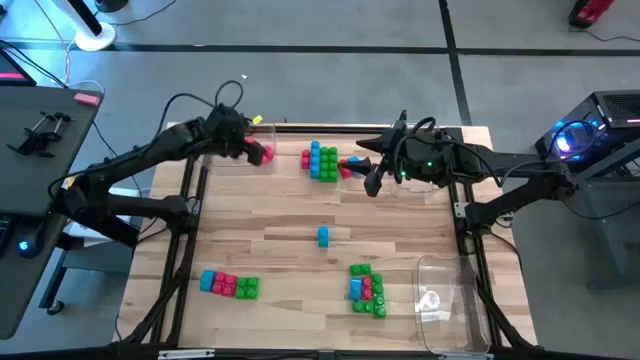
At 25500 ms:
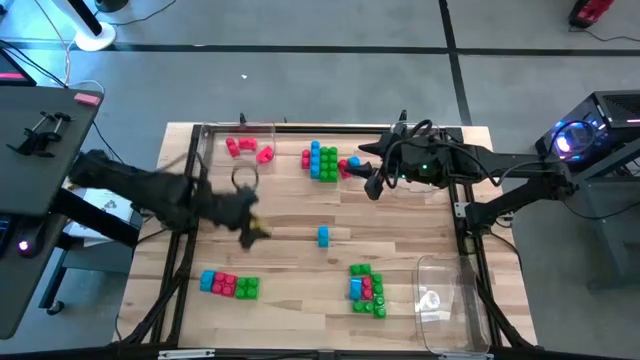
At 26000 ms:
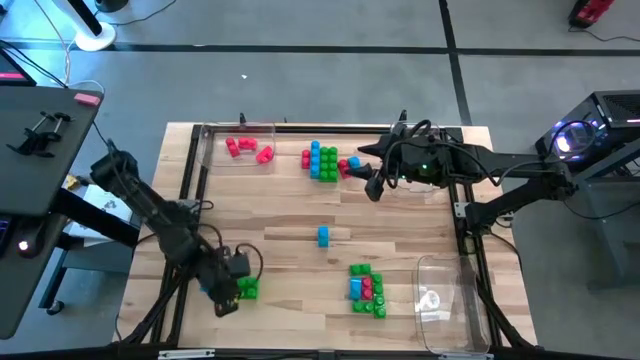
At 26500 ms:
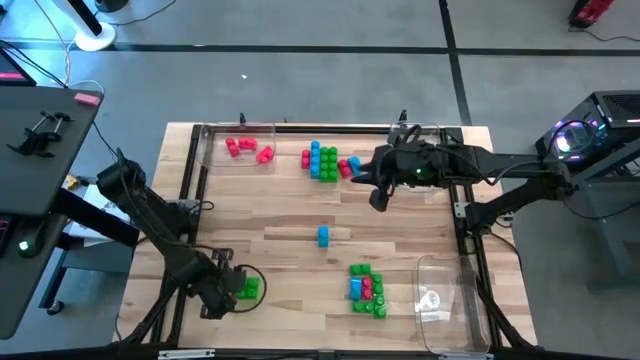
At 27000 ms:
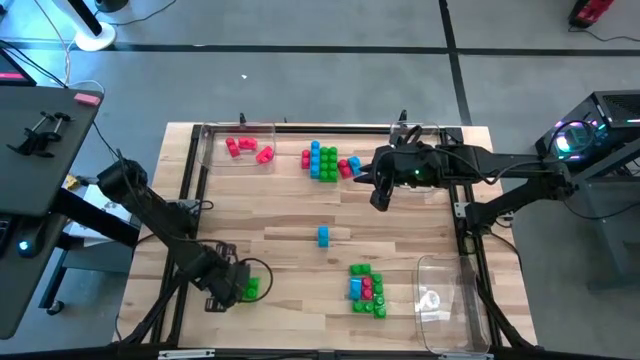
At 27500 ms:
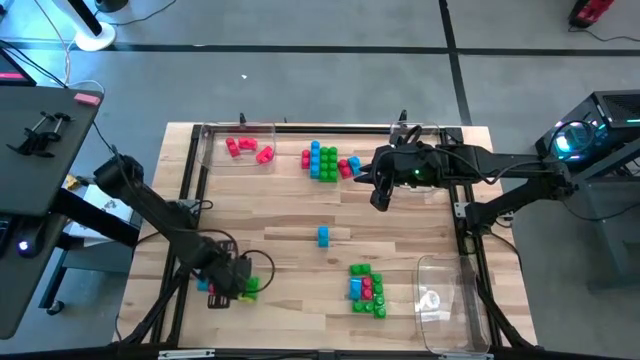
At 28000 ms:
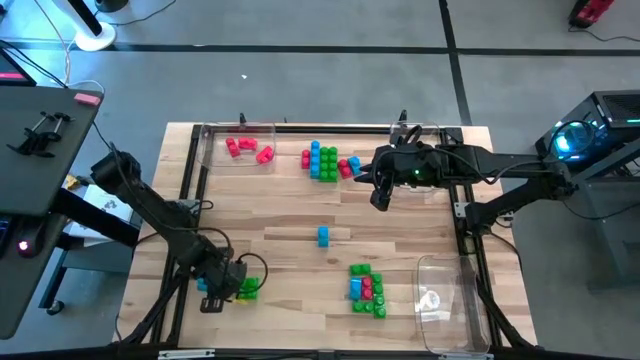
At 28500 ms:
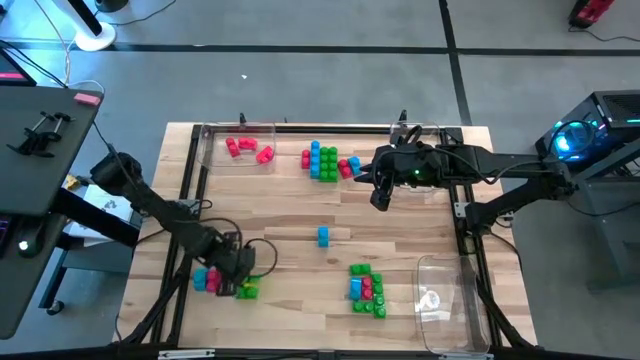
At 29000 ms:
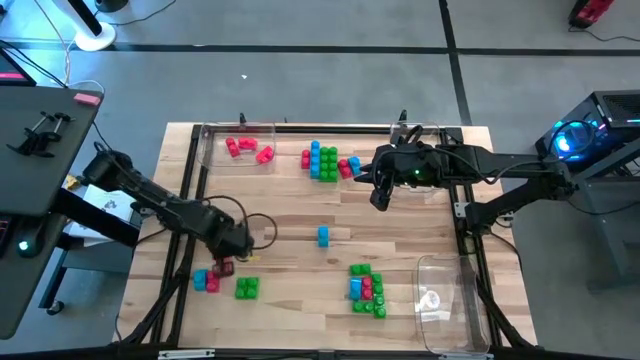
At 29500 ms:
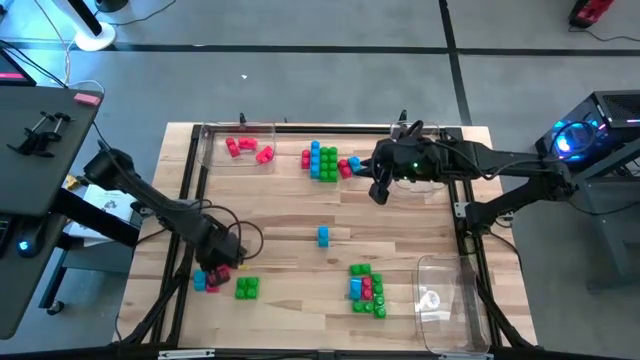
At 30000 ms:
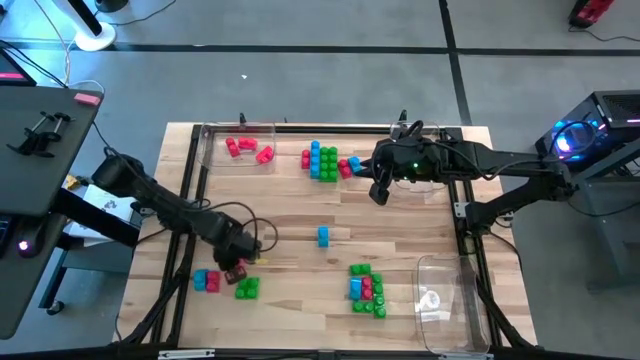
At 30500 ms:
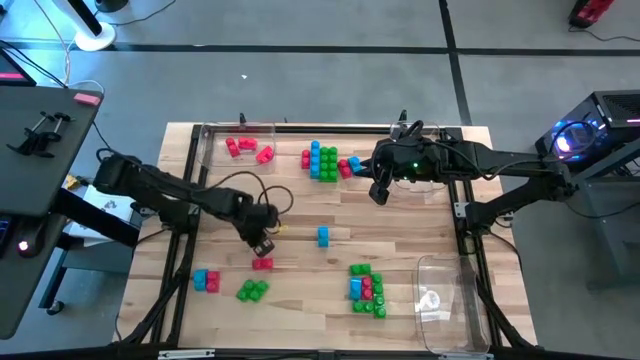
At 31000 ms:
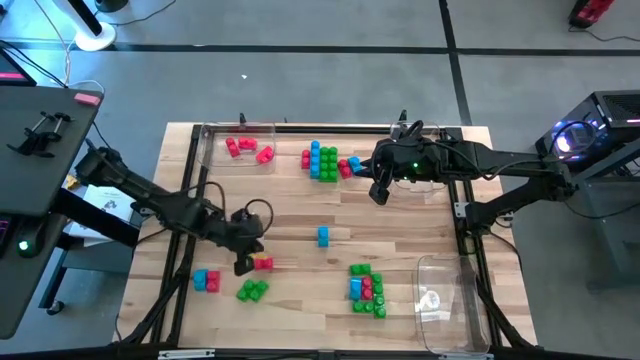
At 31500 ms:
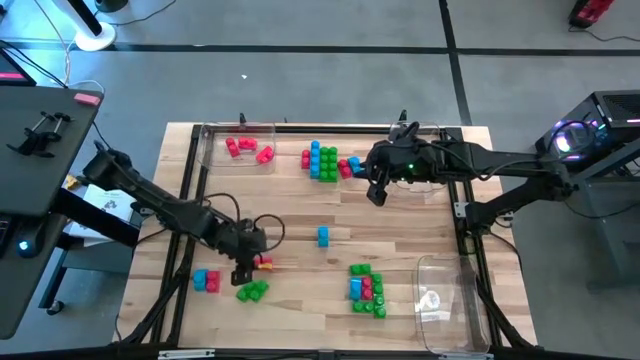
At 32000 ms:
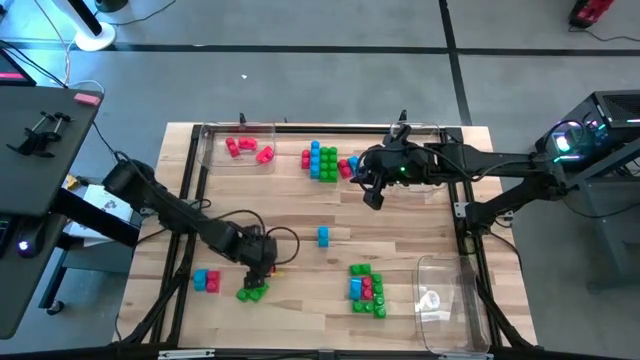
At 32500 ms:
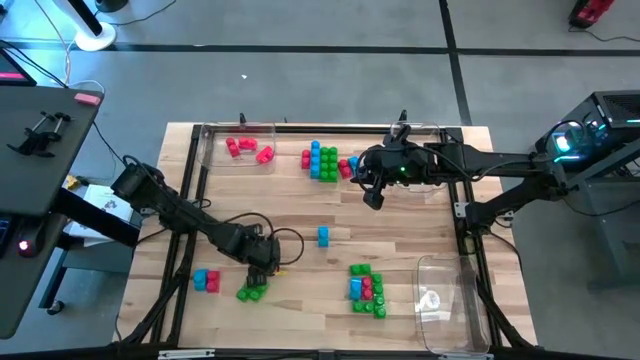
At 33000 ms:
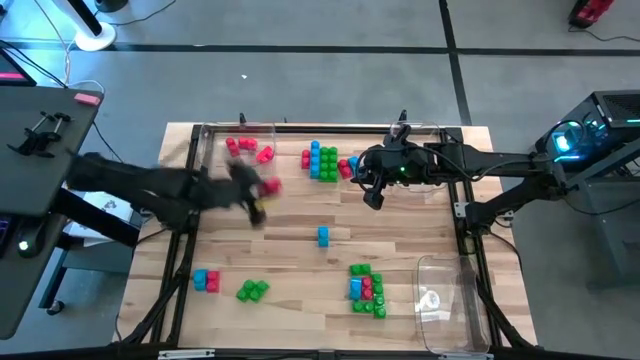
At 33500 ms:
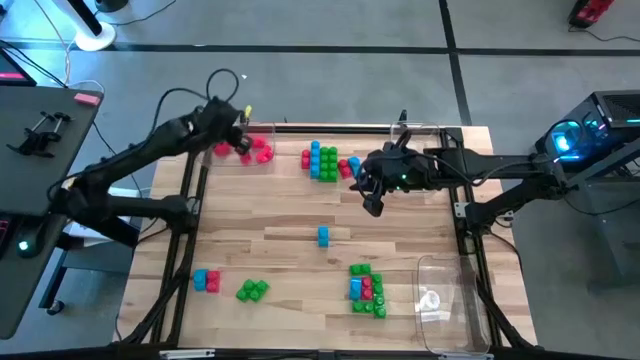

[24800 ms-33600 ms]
Task: Sort blocks
Put the red game piece into the top left transparent bin

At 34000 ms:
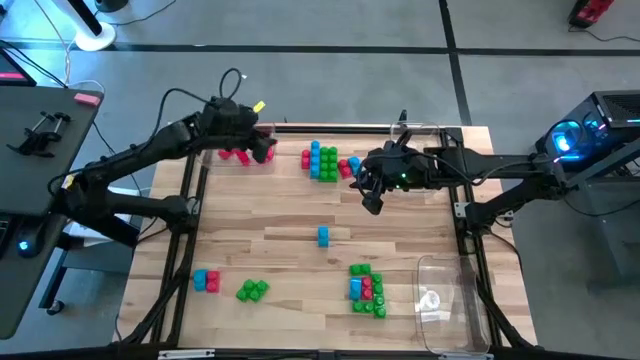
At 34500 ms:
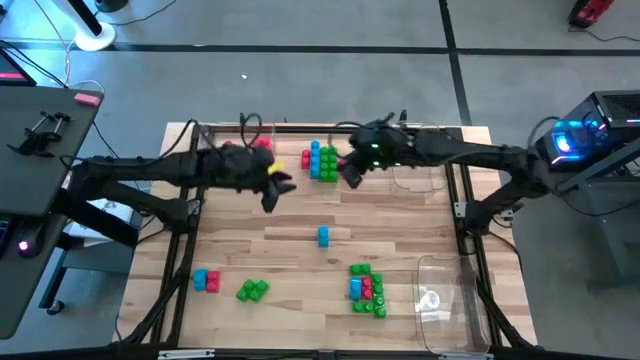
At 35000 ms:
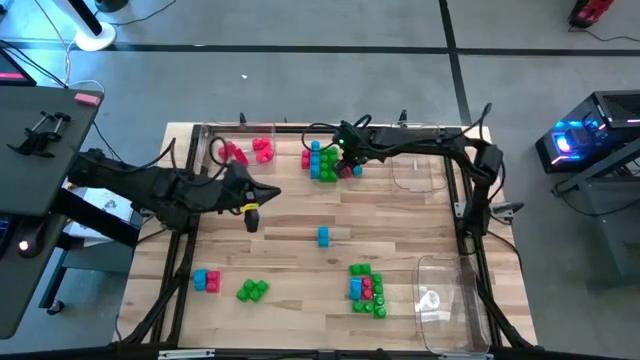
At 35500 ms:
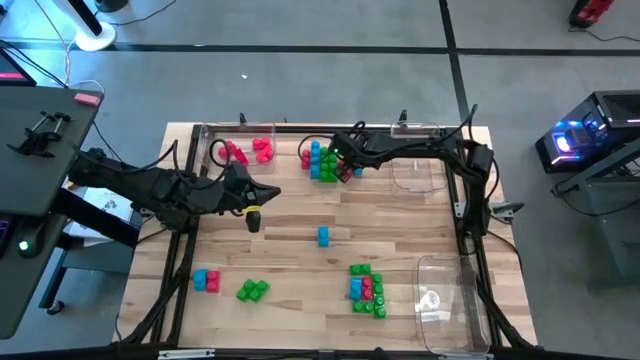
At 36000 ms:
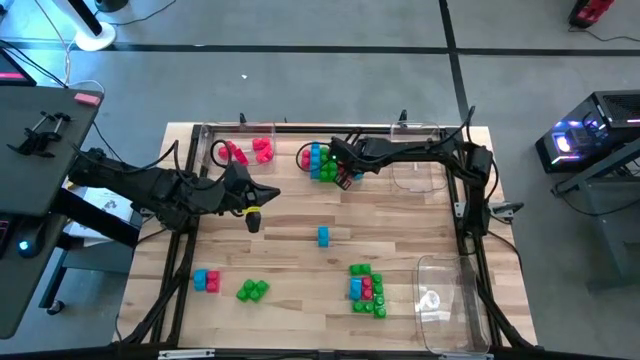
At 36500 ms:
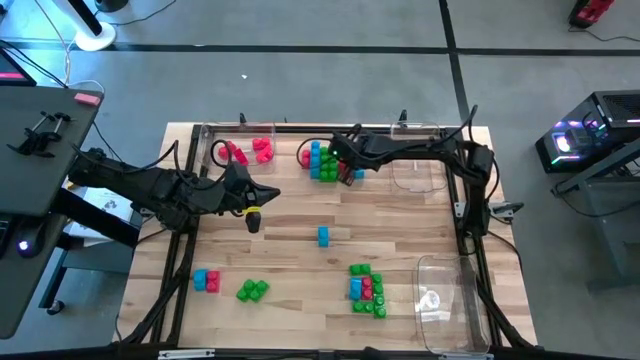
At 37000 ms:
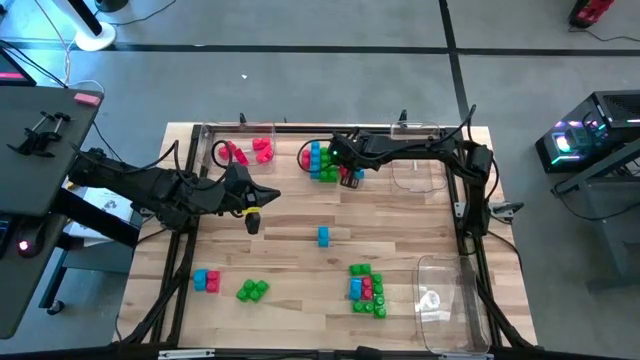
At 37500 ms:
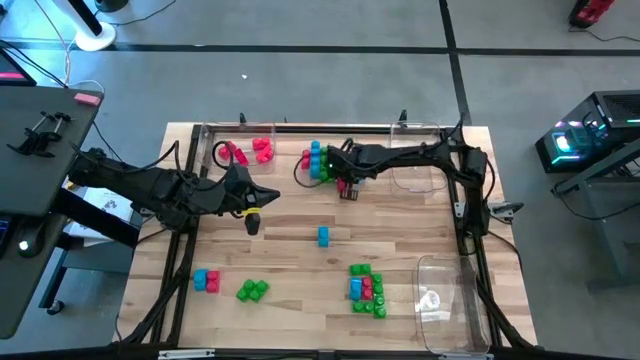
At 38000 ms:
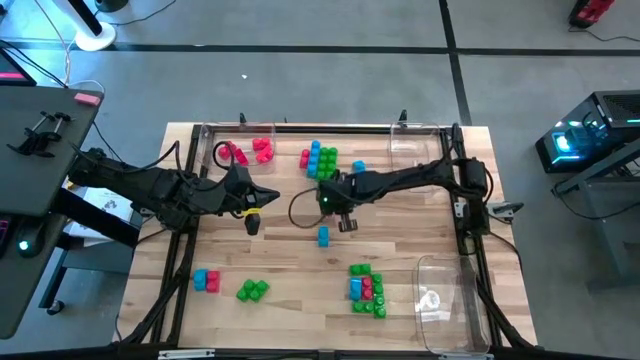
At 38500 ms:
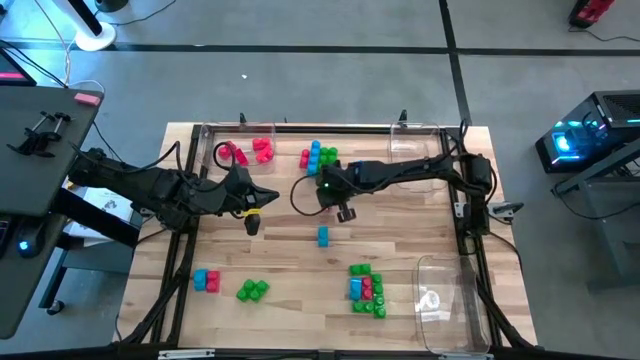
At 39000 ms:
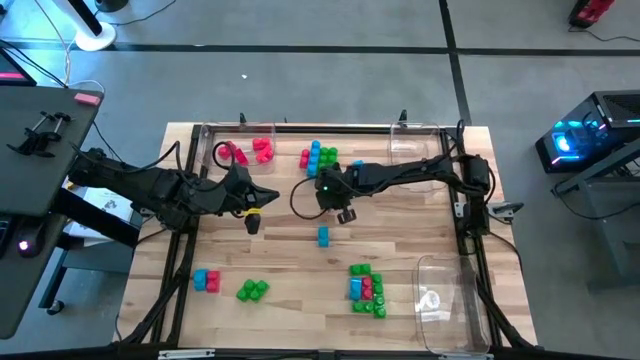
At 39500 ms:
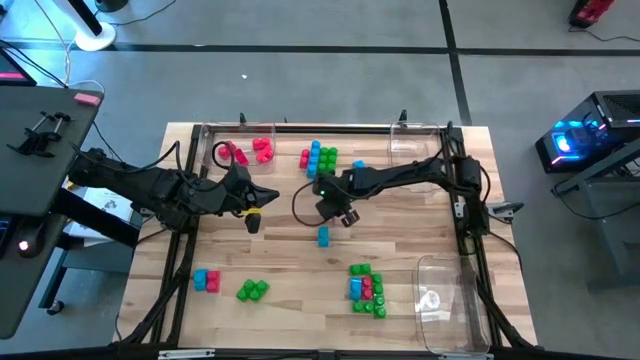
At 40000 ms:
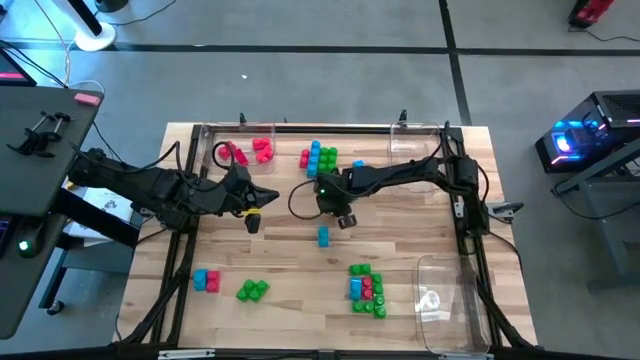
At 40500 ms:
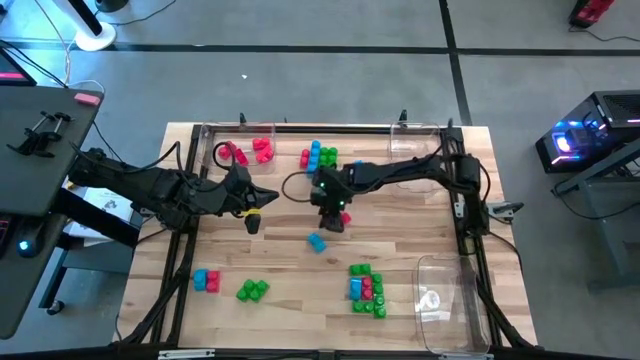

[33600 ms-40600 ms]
Put the red game piece into the top left transparent bin

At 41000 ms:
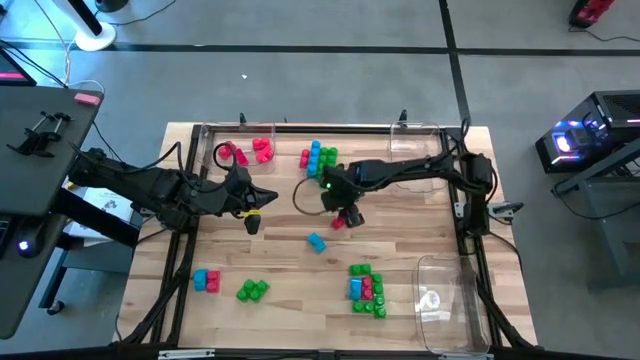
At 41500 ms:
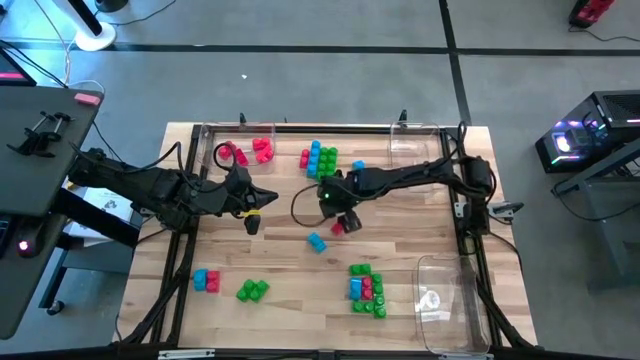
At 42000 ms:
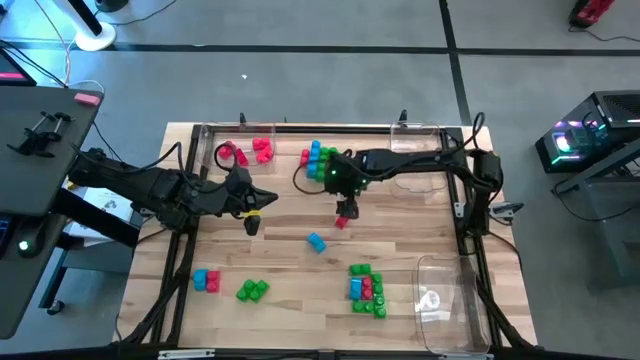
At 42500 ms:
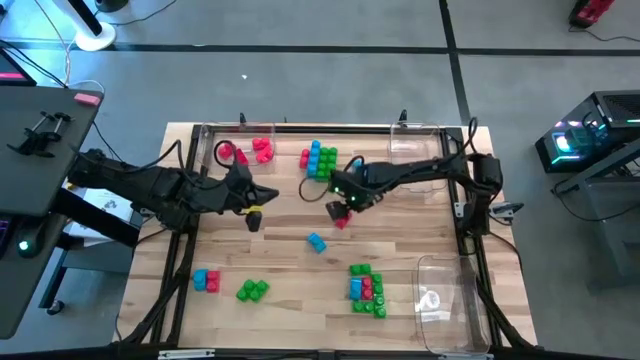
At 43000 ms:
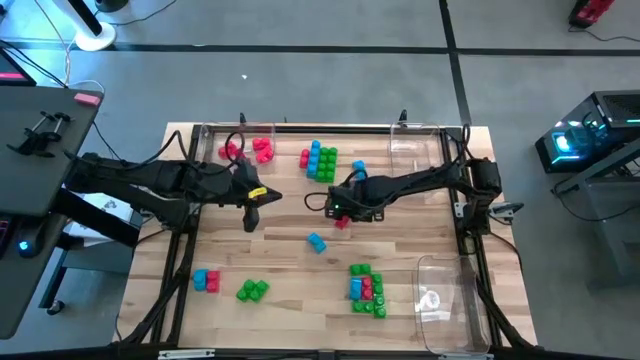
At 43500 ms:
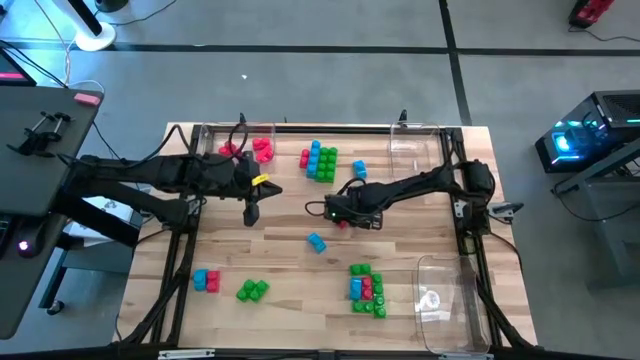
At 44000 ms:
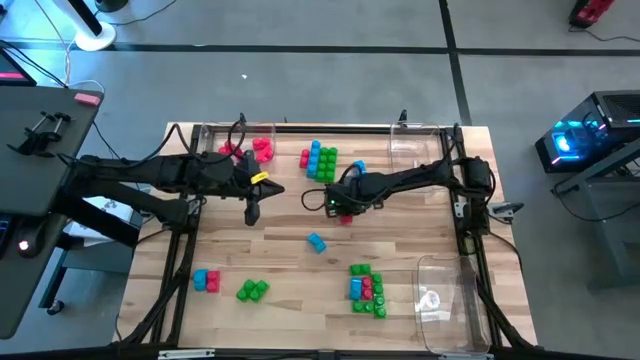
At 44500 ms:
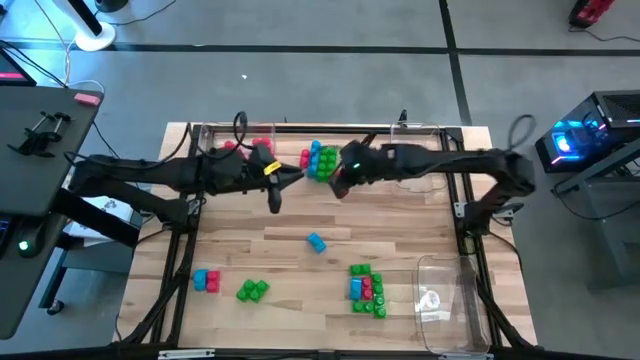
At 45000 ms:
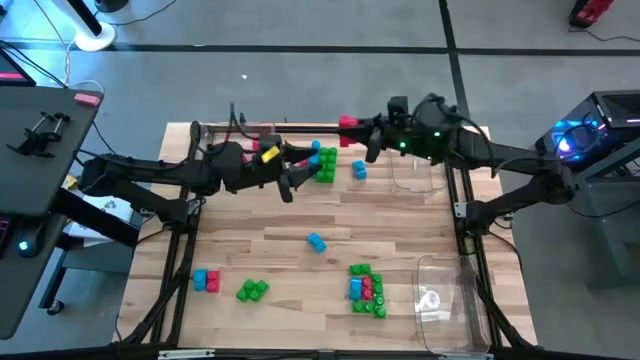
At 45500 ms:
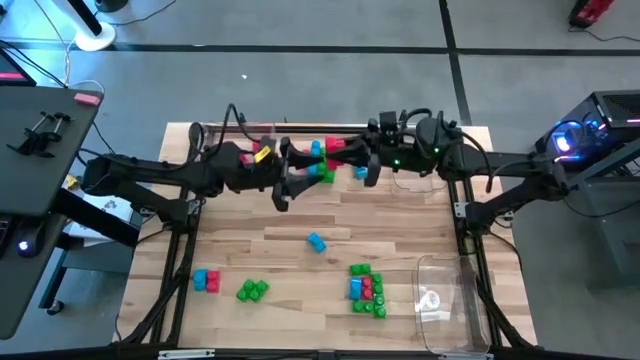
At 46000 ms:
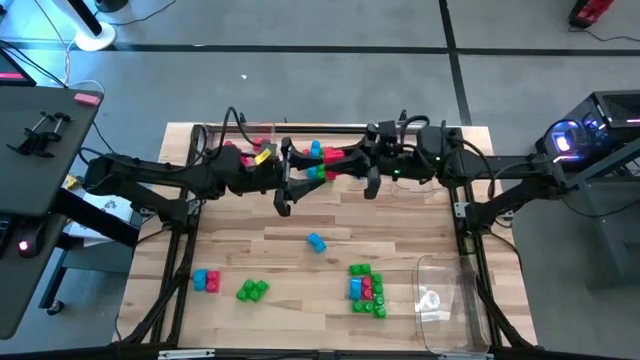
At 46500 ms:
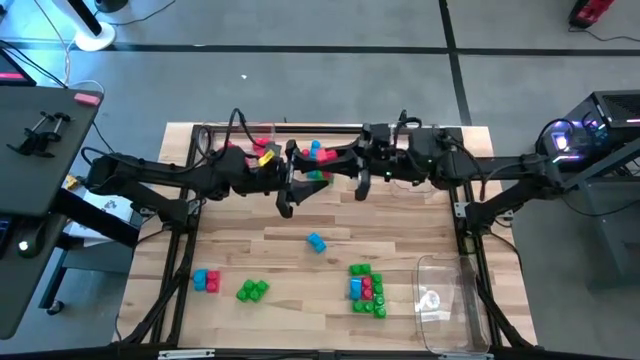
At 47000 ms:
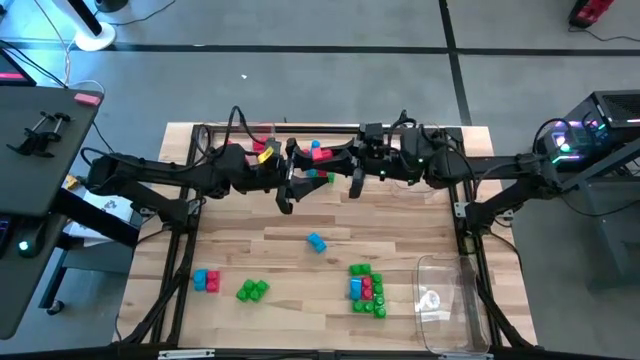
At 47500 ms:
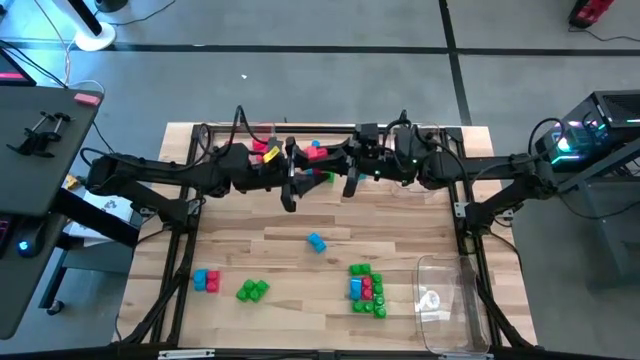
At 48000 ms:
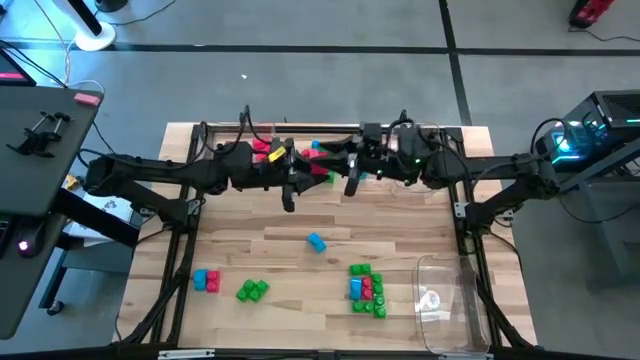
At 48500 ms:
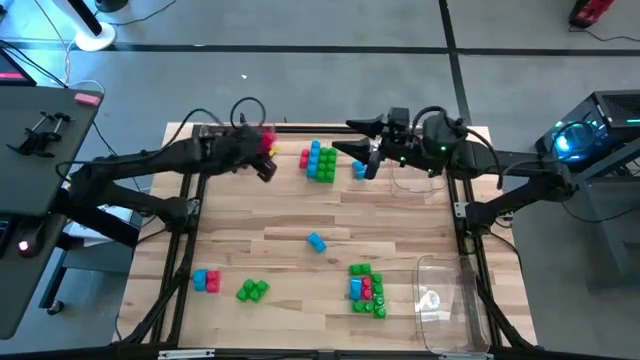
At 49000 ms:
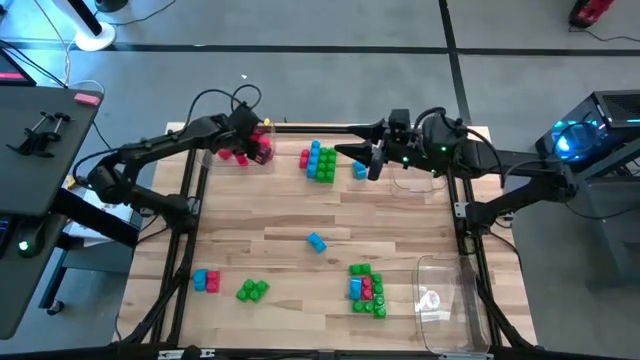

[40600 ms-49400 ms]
Put the red game piece into the top left transparent bin
